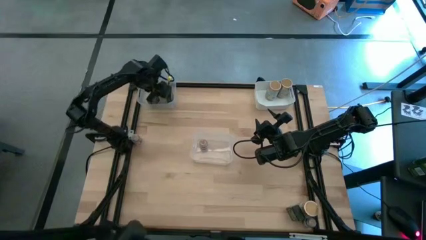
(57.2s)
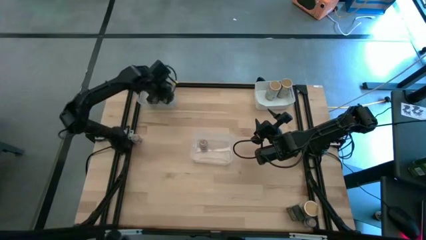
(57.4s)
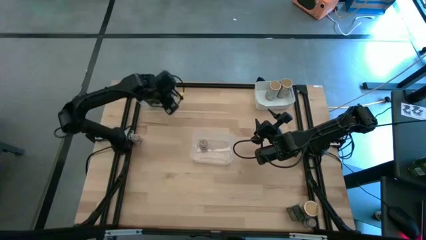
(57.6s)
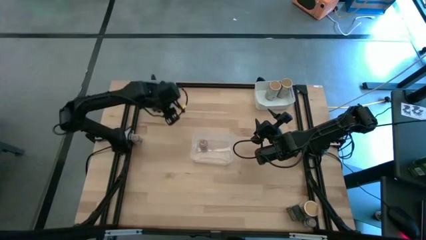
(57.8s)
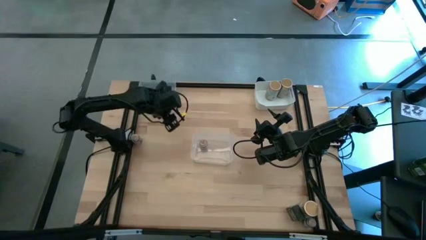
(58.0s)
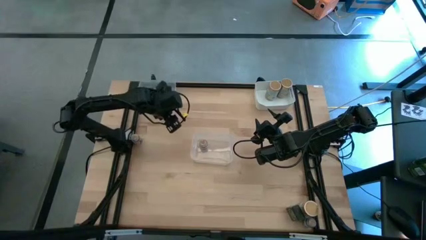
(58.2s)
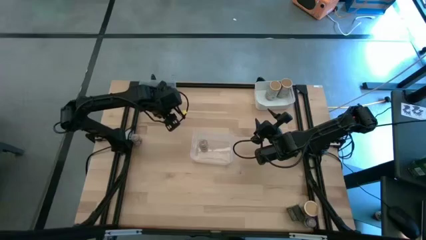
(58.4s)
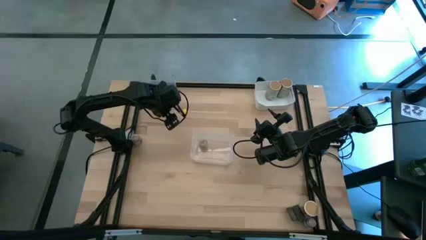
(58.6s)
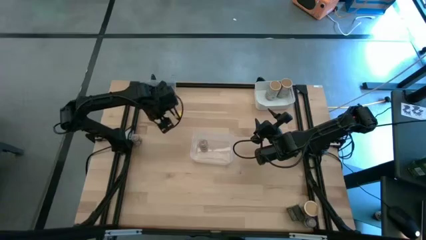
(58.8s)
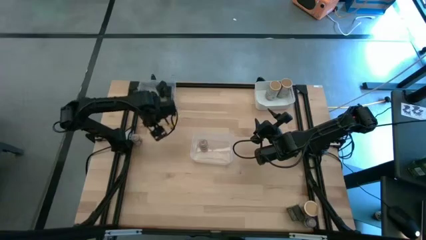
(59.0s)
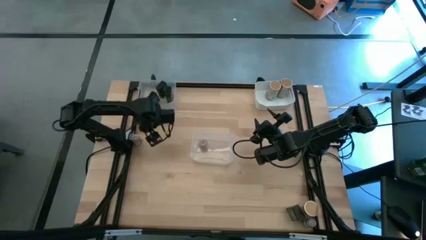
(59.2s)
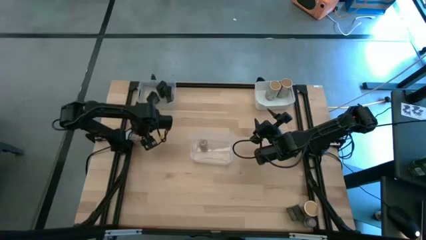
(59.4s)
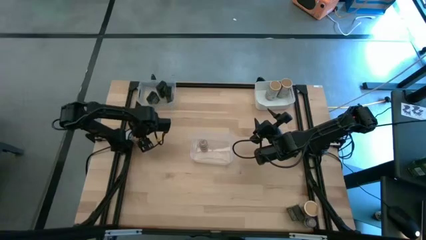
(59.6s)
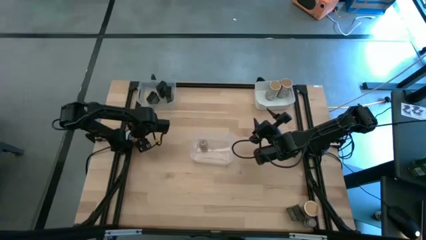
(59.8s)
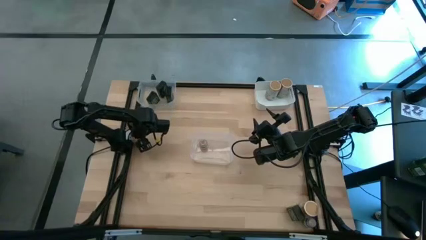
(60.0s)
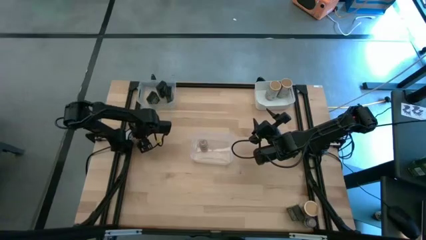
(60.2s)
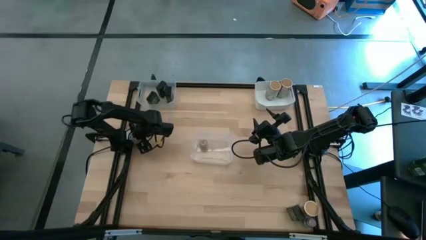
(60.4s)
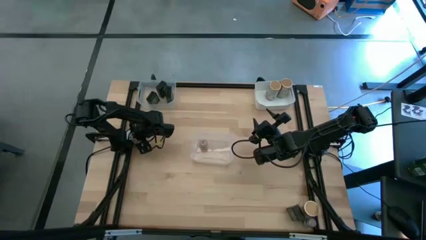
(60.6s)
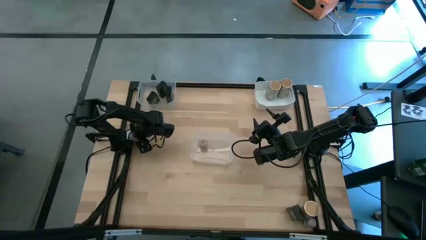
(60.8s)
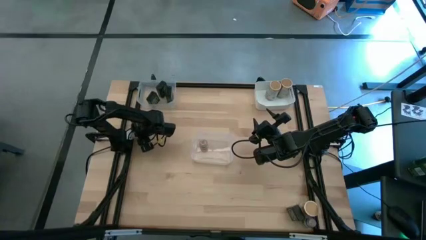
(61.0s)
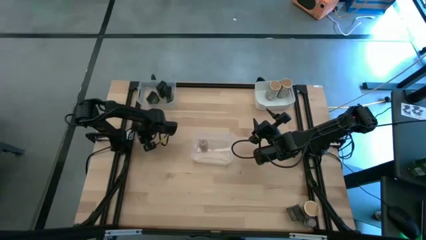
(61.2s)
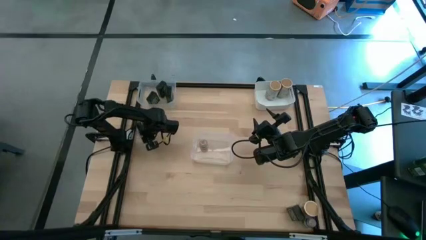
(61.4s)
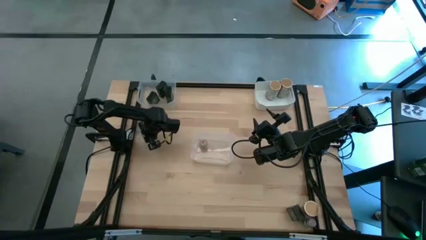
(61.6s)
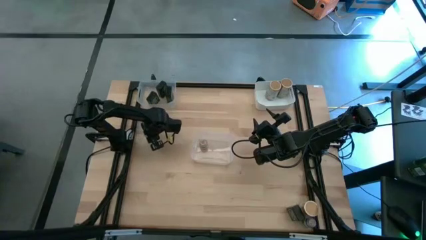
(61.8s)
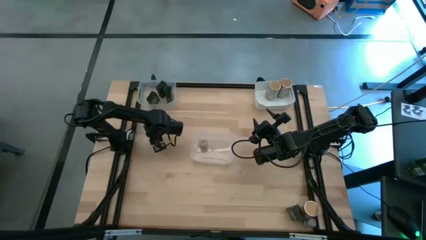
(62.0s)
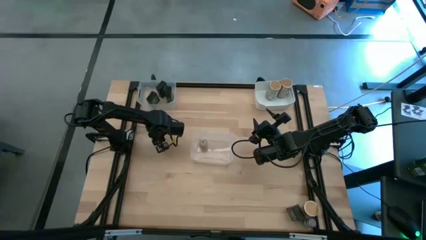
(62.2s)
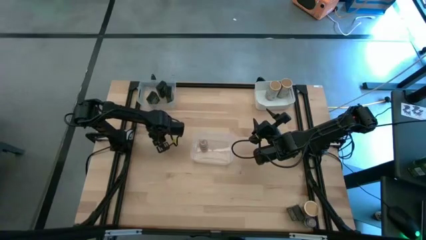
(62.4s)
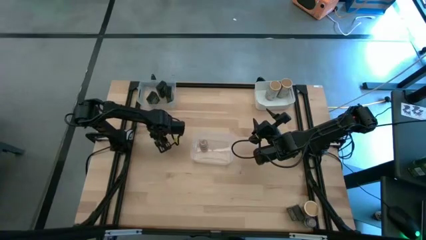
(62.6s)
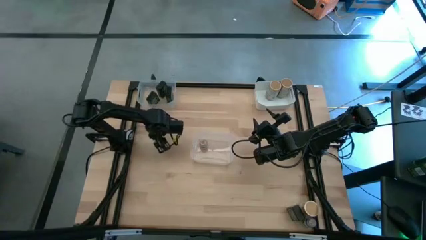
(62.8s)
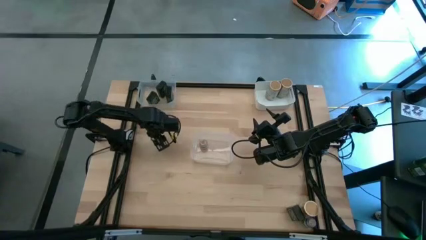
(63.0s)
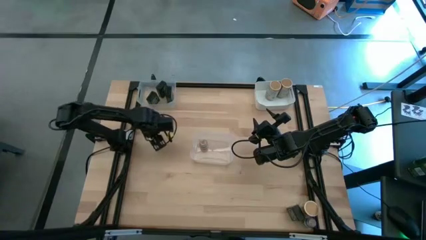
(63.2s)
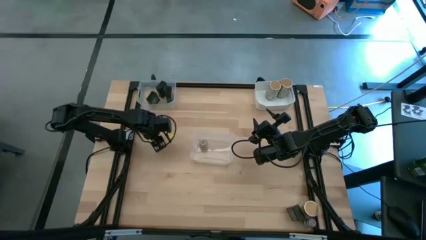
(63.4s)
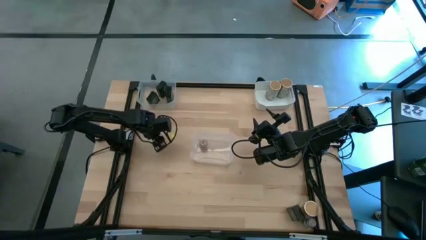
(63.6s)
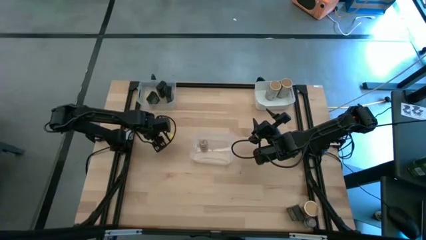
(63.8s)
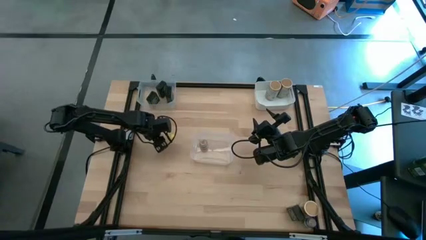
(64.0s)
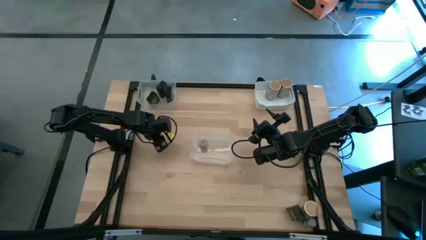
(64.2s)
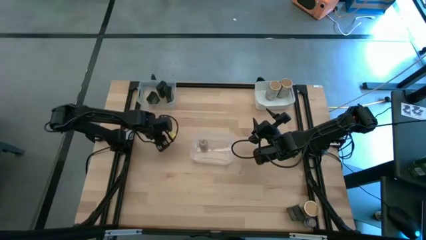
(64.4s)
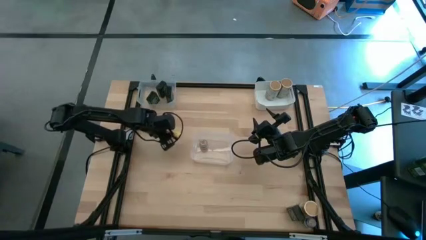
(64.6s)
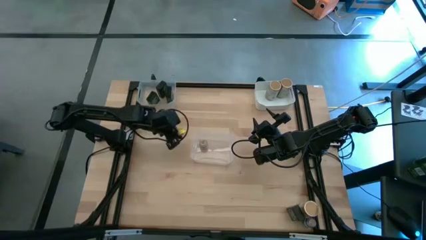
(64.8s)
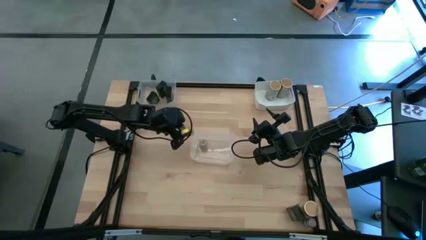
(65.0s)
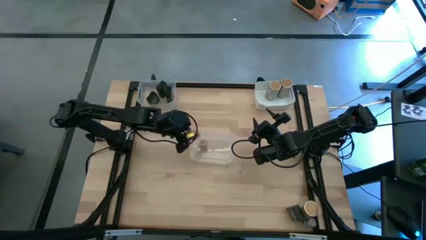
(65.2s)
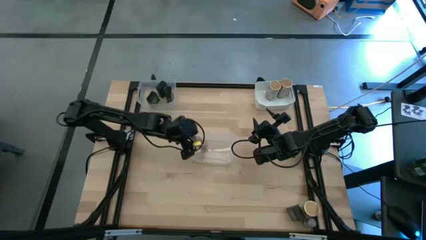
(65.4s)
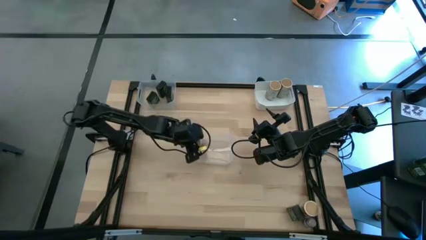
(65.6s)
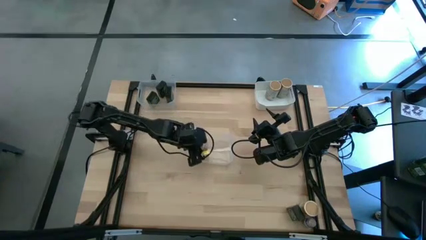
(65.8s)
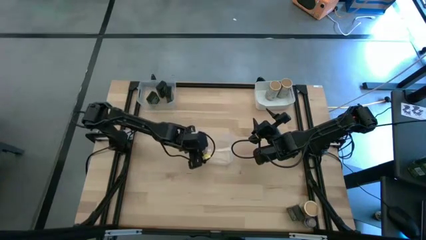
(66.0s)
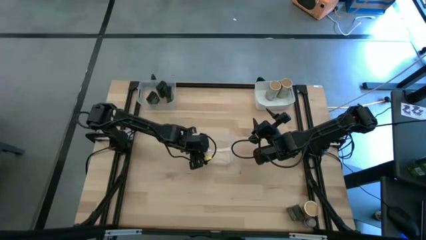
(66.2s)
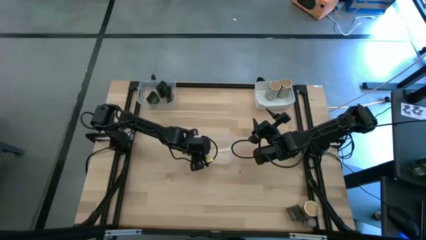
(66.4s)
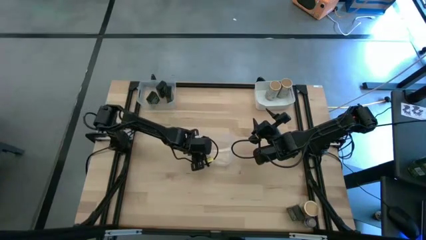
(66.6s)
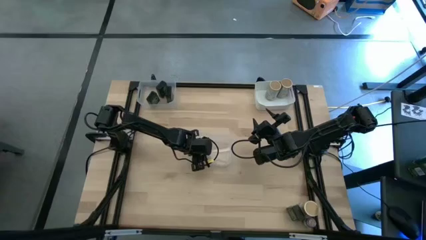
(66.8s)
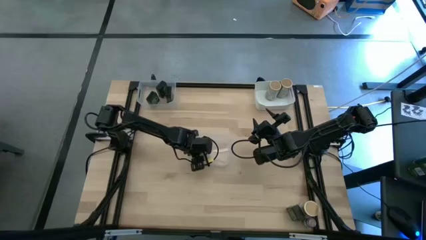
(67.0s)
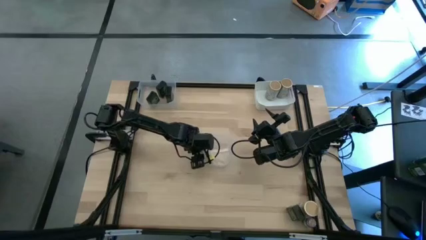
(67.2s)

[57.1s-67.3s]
Task: Sort spices by type
Put the brown seasoning bottle into the bottom transparent bin
